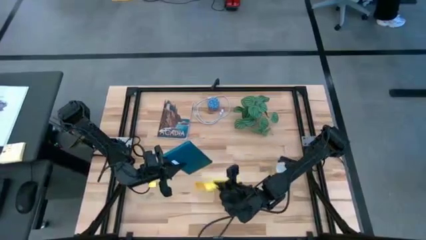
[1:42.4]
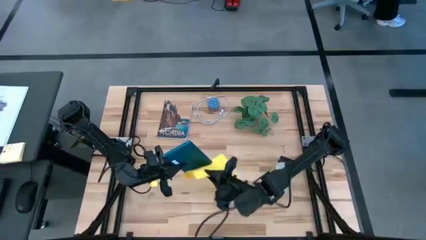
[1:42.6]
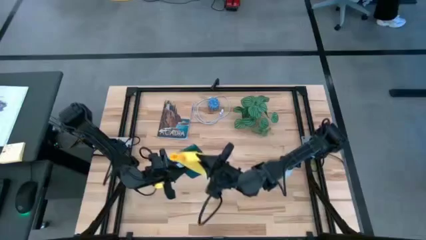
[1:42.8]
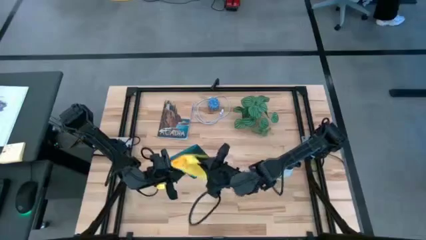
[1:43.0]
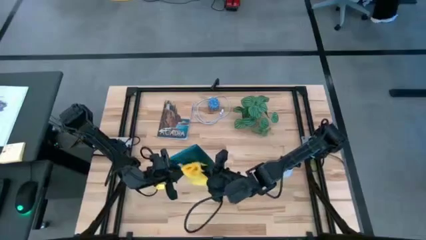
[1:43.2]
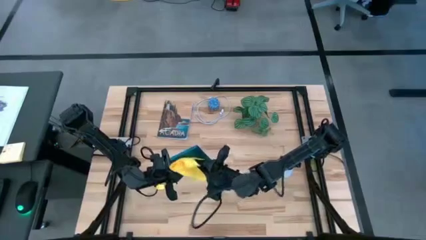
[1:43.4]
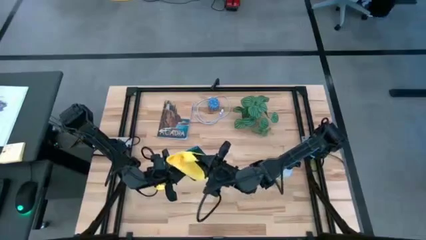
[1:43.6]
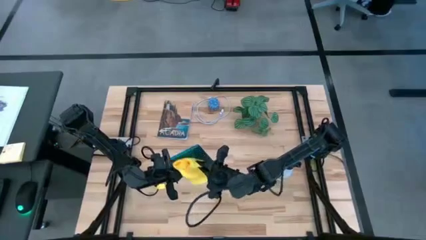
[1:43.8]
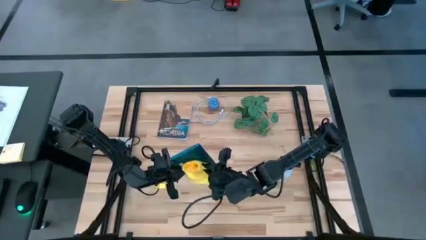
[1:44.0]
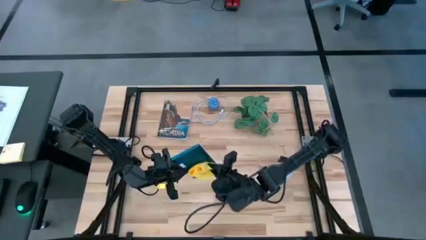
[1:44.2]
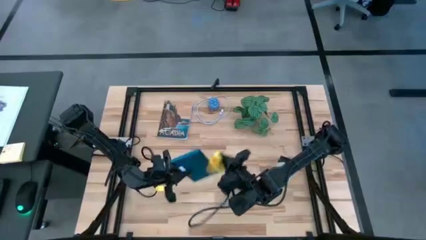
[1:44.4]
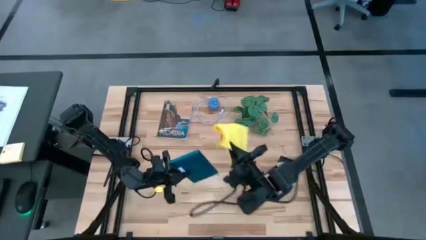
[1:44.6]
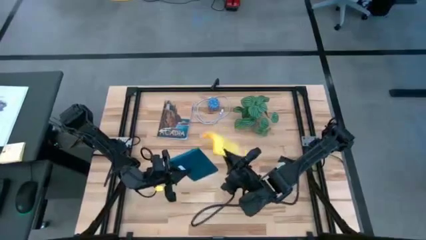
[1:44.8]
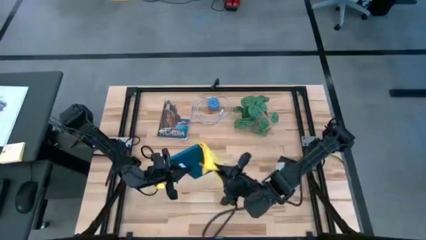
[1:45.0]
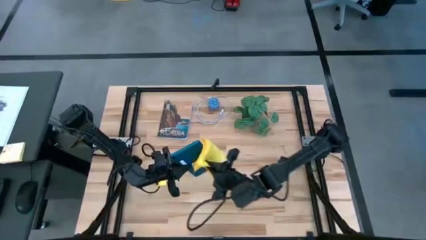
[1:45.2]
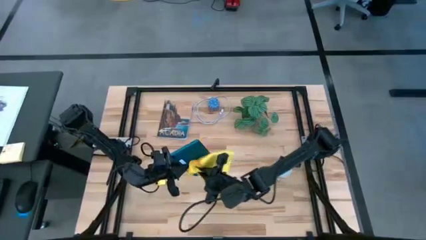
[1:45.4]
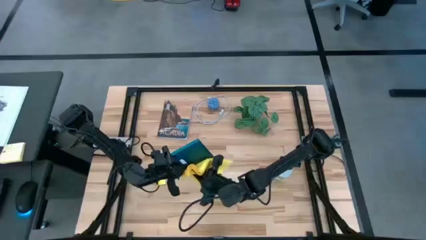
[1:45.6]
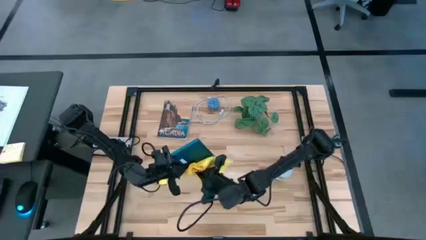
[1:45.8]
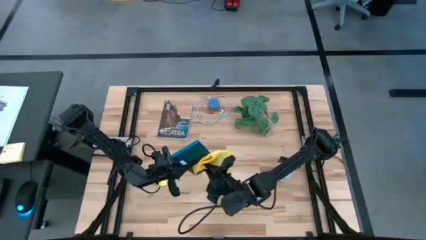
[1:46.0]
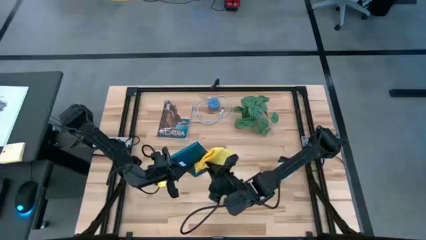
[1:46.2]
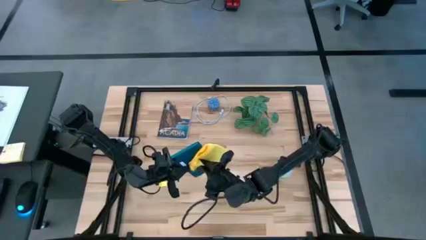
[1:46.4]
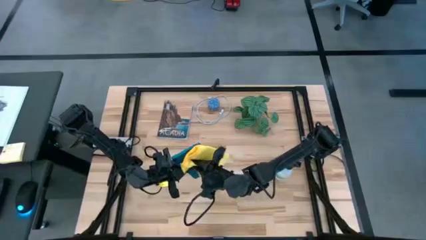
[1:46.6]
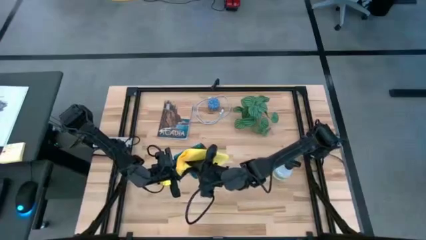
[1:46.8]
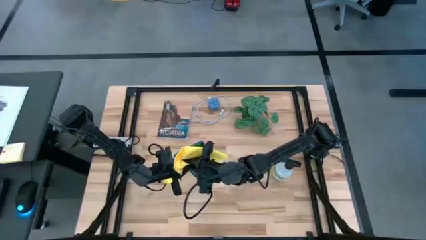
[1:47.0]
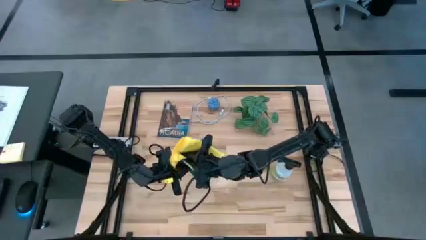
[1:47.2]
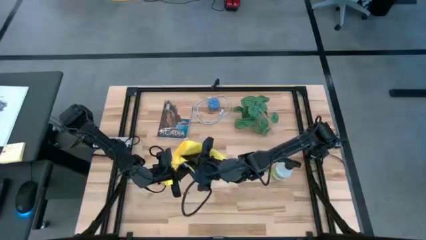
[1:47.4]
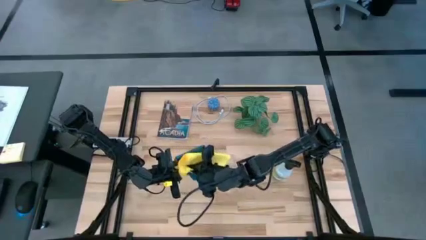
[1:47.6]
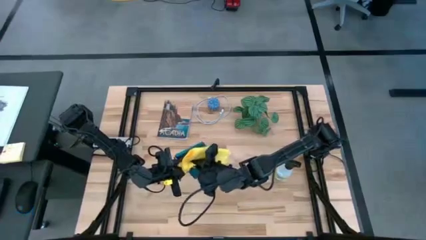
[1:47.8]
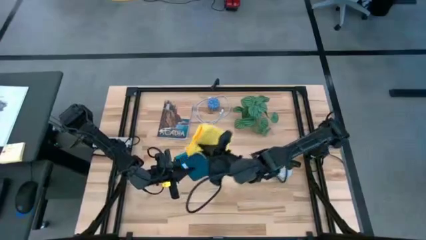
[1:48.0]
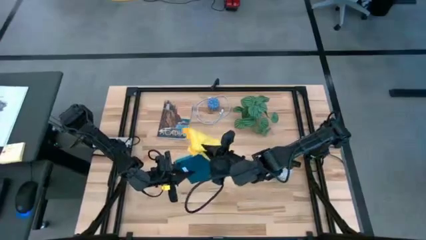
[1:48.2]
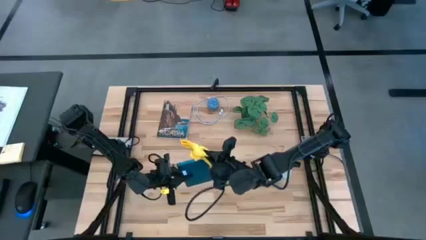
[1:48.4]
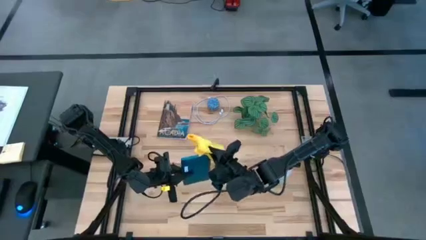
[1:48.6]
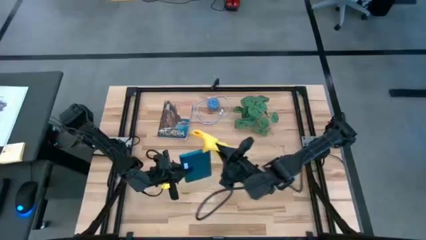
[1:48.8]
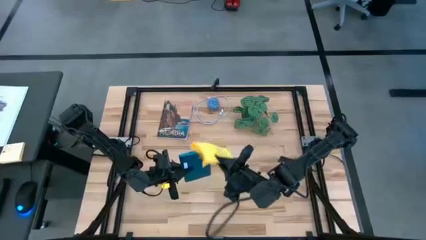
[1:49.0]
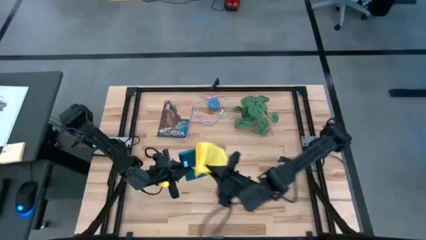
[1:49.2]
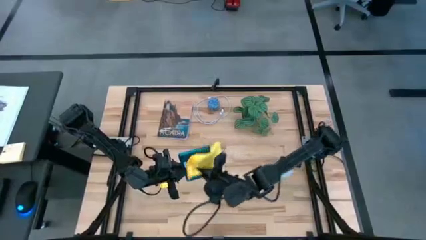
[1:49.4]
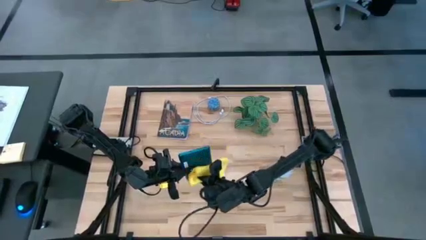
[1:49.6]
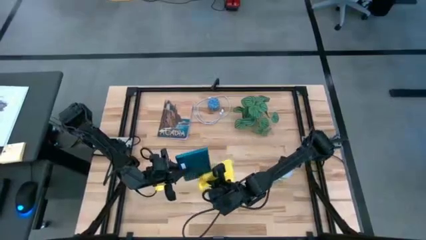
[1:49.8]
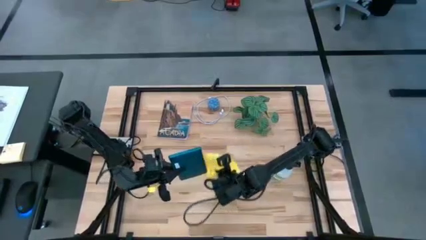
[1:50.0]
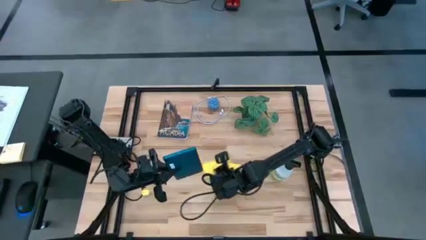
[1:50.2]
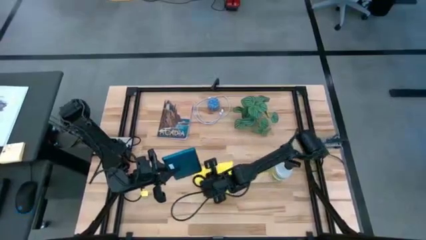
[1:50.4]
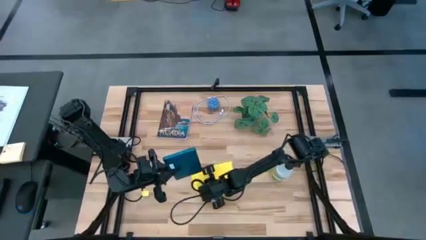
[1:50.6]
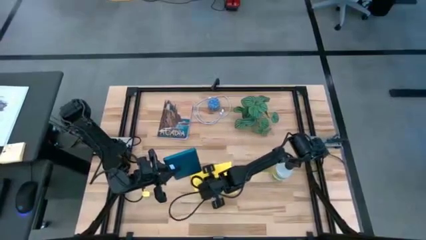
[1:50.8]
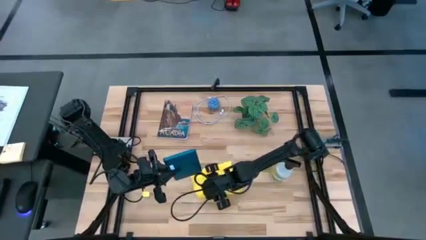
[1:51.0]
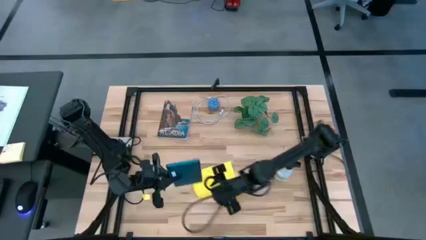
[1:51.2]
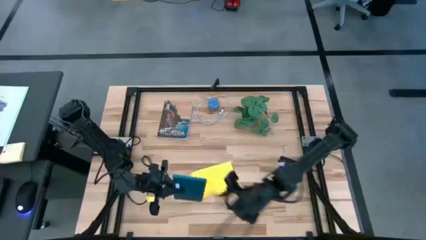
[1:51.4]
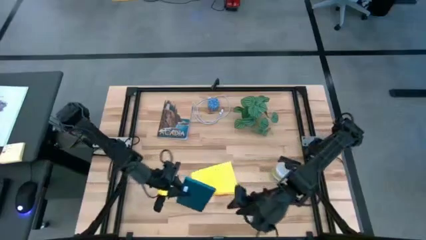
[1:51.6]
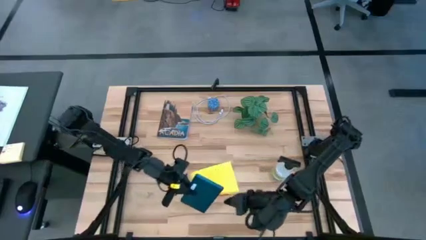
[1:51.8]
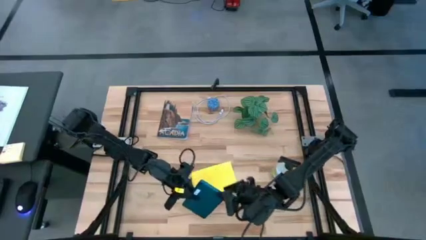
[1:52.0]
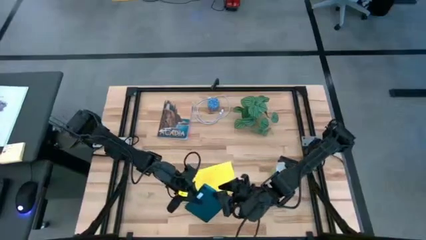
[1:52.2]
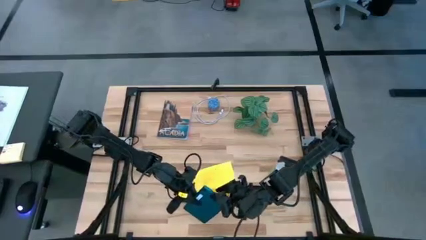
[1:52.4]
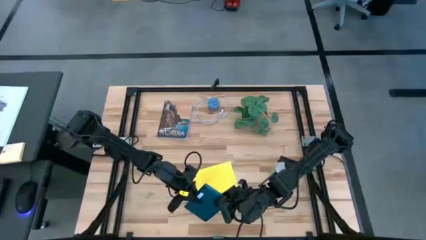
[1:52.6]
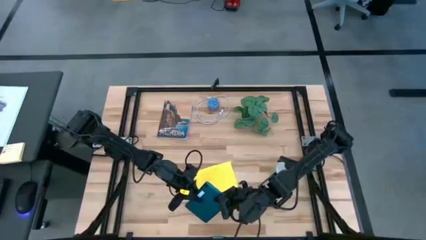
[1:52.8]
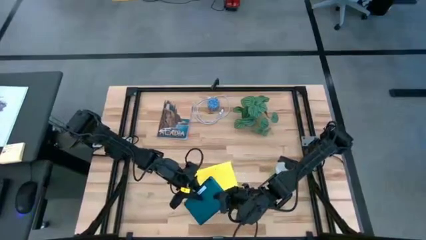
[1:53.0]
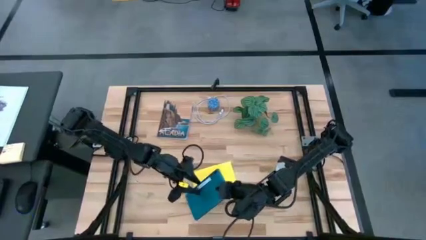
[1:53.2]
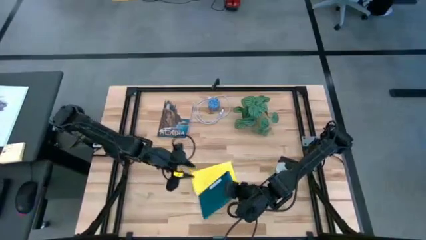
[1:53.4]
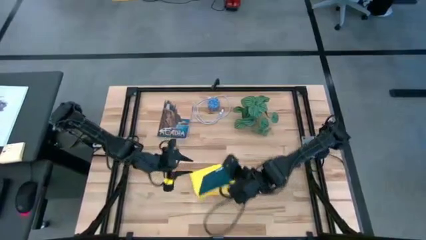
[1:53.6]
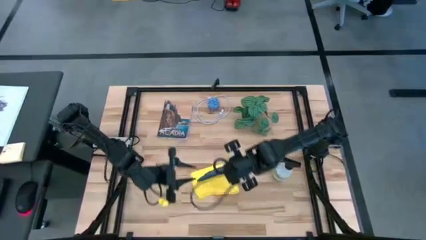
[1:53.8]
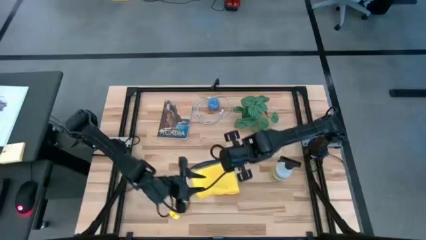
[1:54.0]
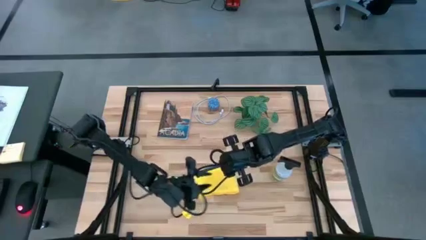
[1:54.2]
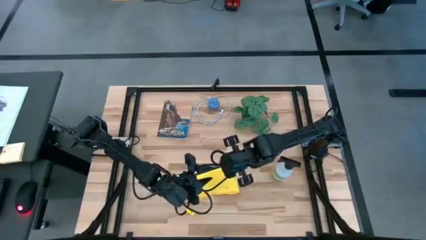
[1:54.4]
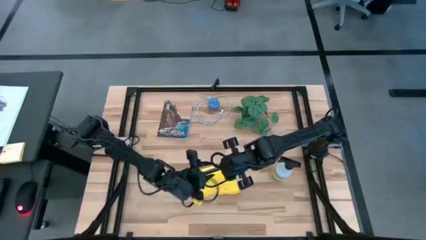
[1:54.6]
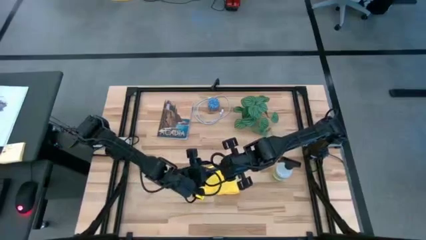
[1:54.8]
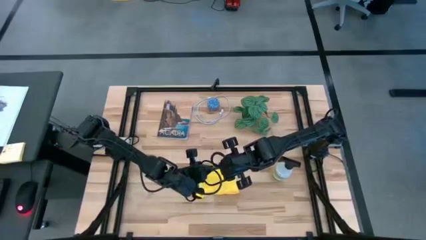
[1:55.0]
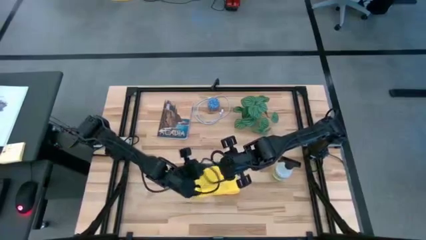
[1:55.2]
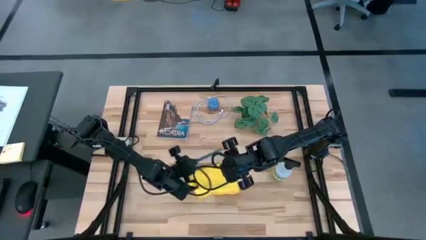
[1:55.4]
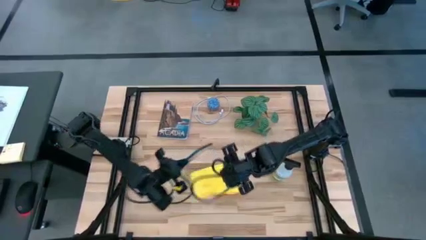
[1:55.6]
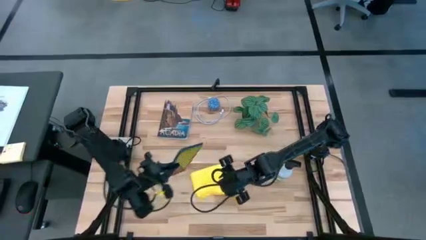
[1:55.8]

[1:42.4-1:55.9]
Task: Apply microfiber cloth
Wipe the blue tablet with the microfiber cloth
